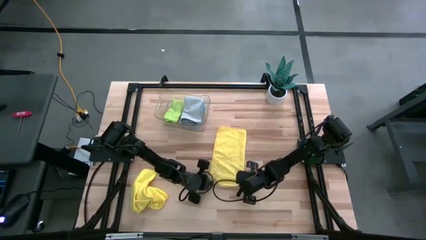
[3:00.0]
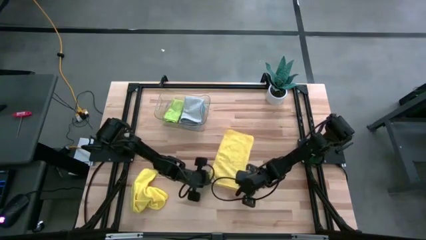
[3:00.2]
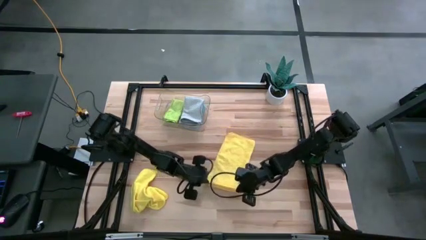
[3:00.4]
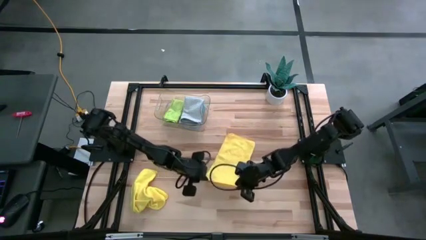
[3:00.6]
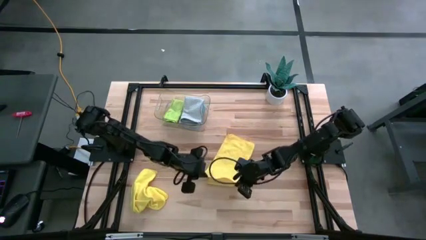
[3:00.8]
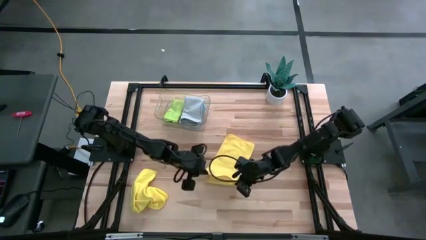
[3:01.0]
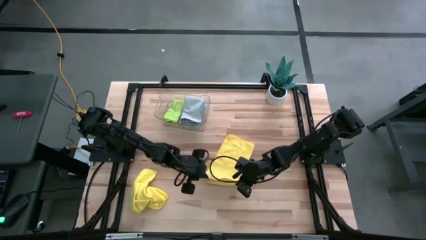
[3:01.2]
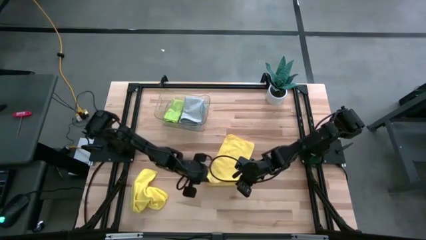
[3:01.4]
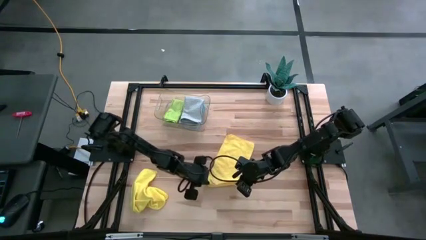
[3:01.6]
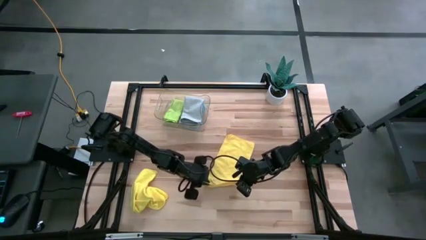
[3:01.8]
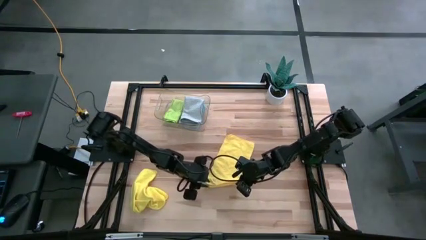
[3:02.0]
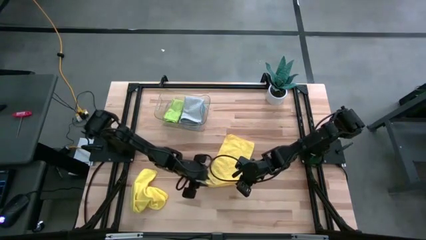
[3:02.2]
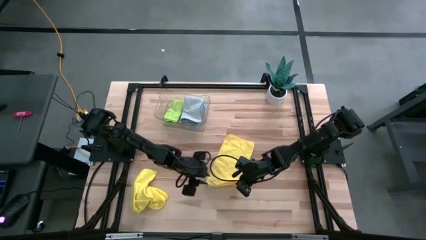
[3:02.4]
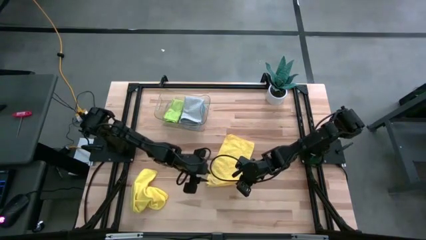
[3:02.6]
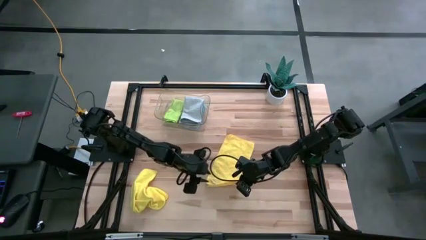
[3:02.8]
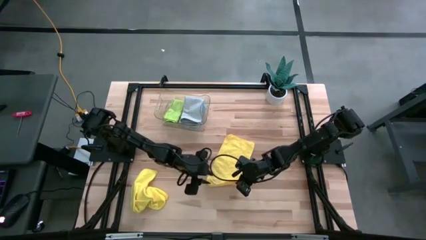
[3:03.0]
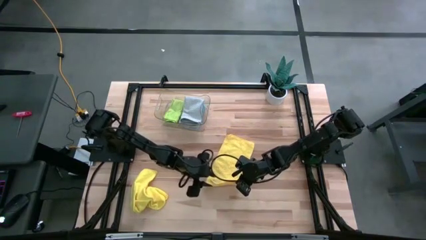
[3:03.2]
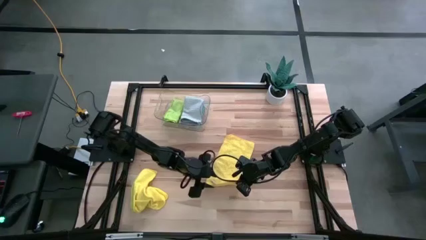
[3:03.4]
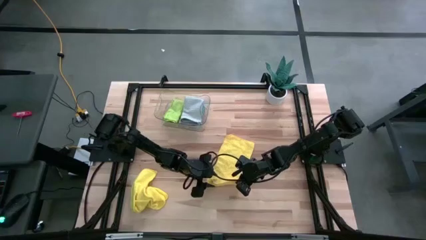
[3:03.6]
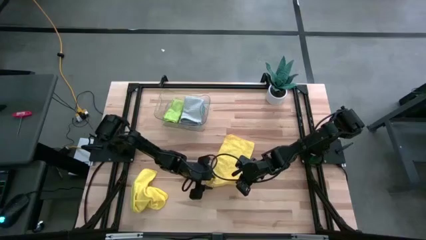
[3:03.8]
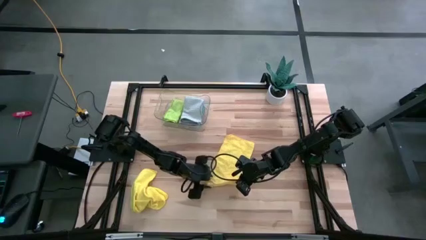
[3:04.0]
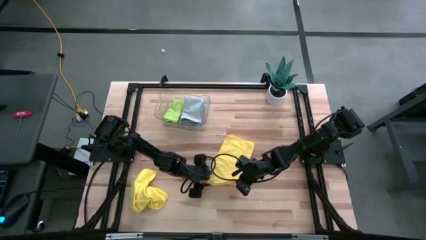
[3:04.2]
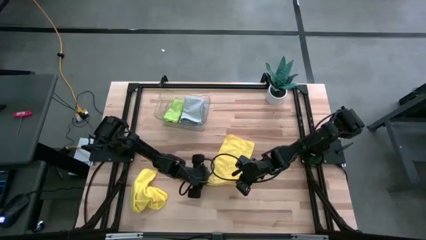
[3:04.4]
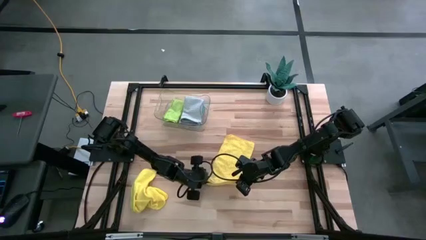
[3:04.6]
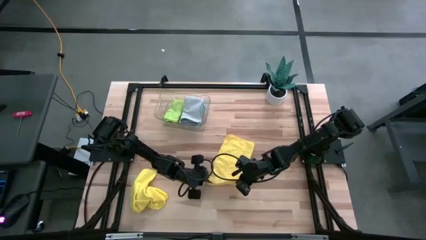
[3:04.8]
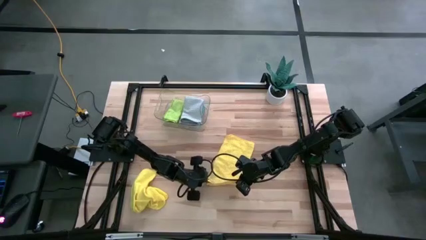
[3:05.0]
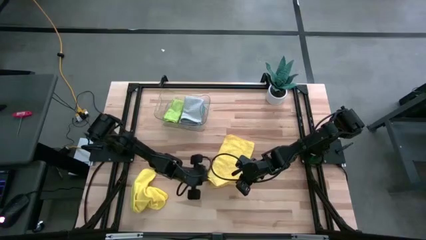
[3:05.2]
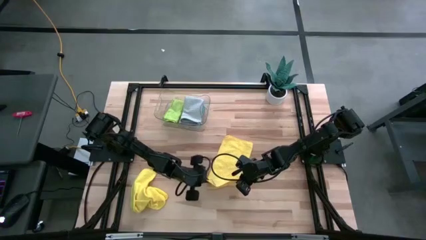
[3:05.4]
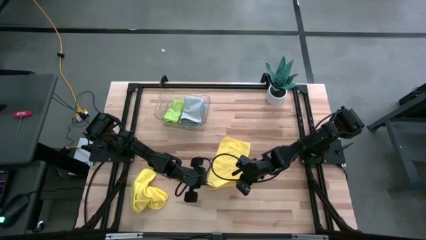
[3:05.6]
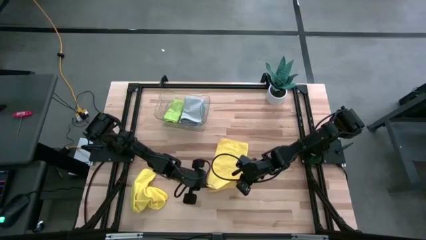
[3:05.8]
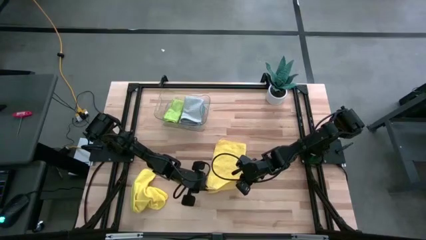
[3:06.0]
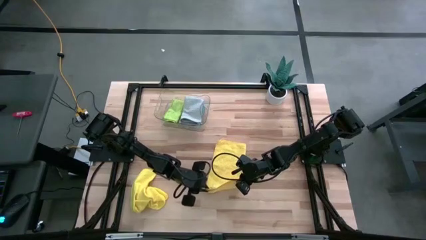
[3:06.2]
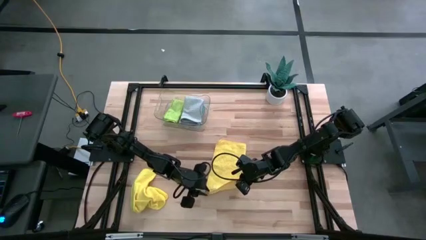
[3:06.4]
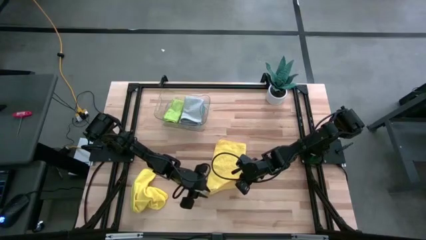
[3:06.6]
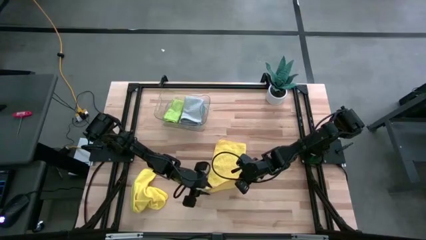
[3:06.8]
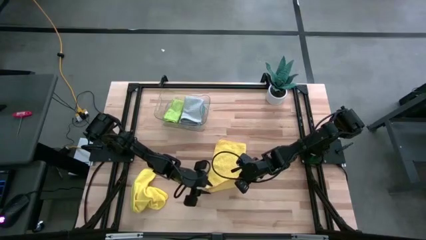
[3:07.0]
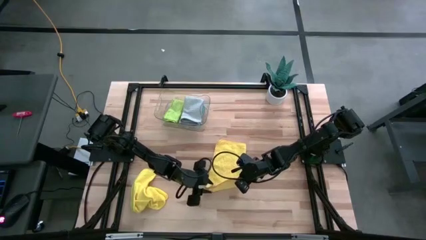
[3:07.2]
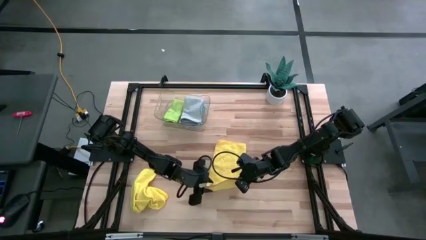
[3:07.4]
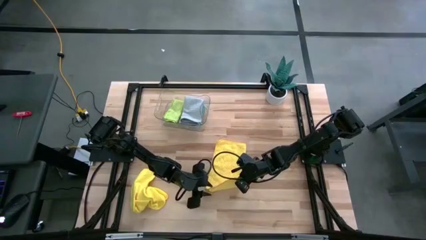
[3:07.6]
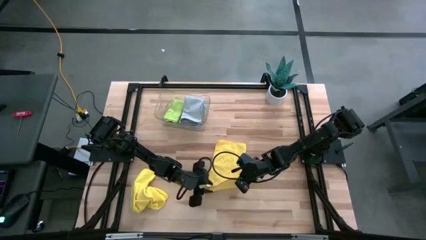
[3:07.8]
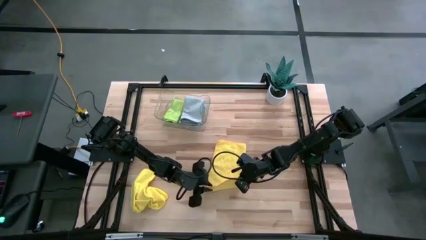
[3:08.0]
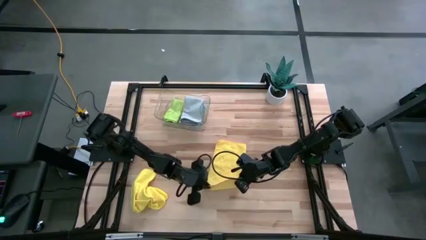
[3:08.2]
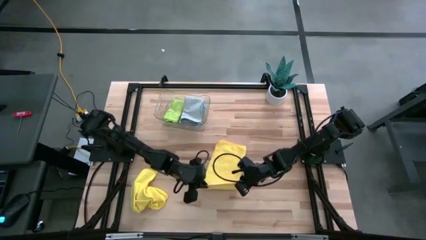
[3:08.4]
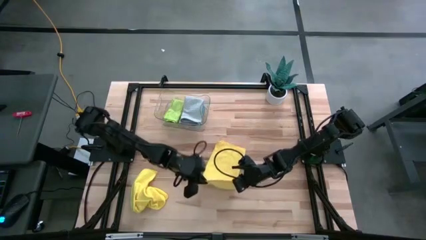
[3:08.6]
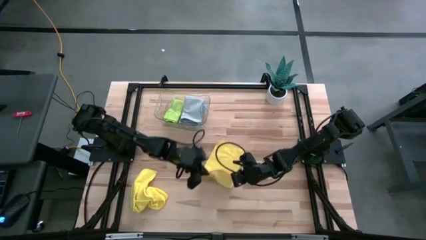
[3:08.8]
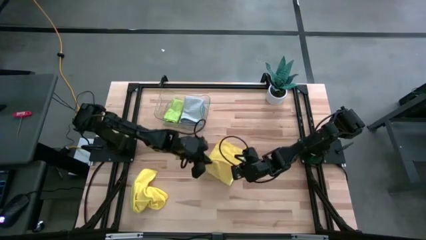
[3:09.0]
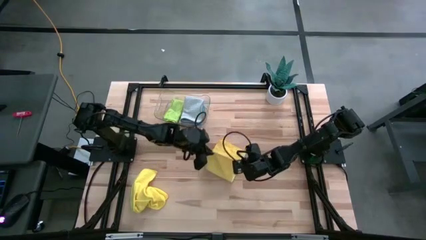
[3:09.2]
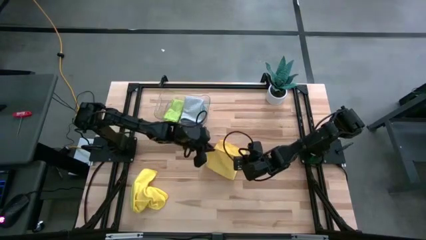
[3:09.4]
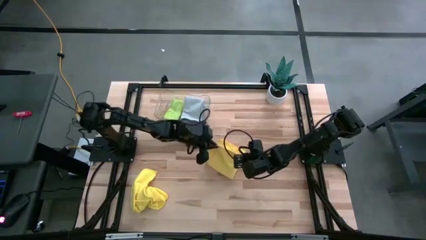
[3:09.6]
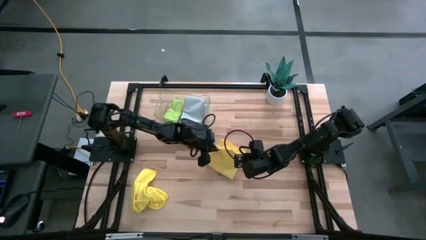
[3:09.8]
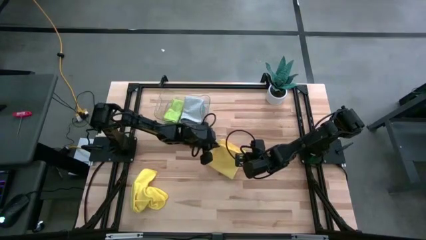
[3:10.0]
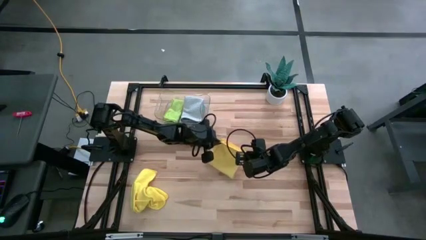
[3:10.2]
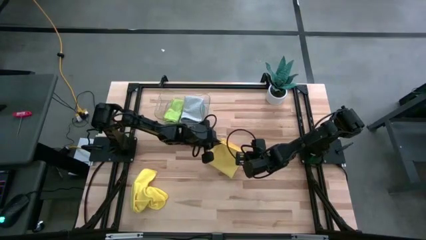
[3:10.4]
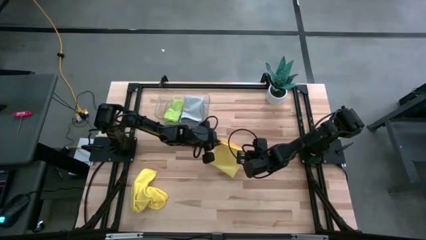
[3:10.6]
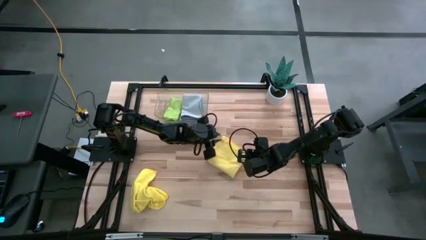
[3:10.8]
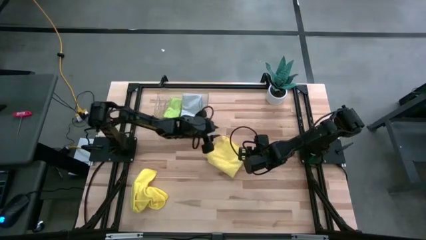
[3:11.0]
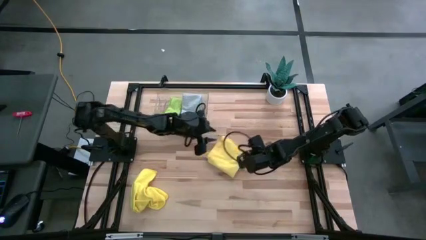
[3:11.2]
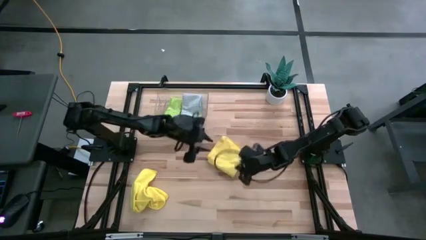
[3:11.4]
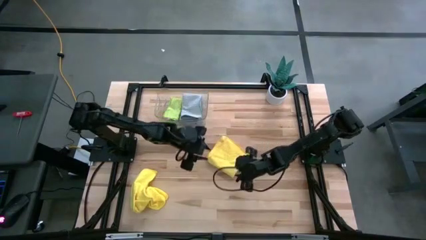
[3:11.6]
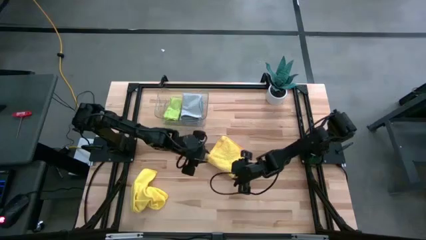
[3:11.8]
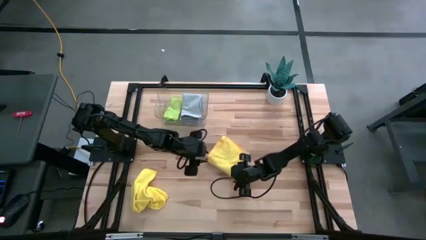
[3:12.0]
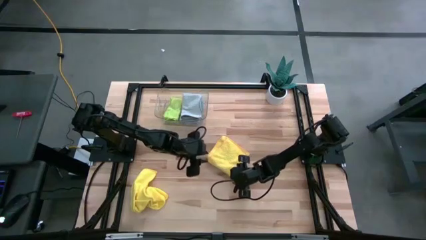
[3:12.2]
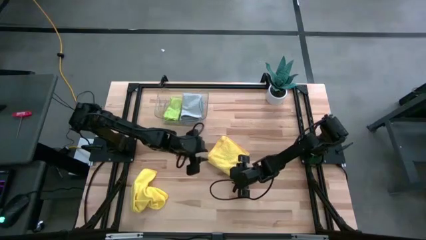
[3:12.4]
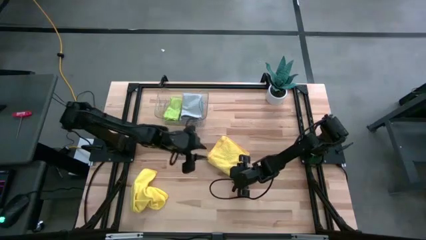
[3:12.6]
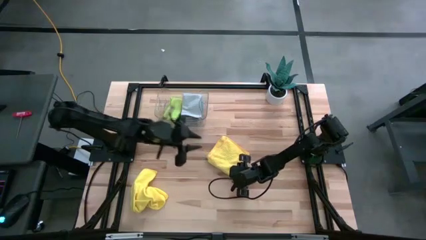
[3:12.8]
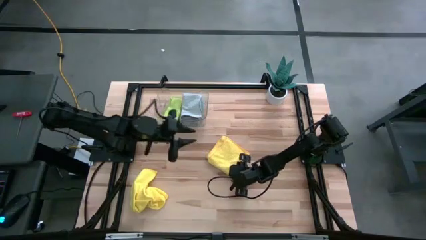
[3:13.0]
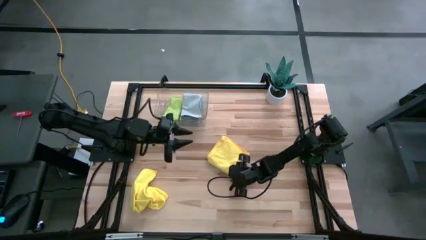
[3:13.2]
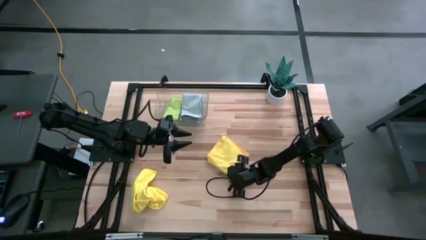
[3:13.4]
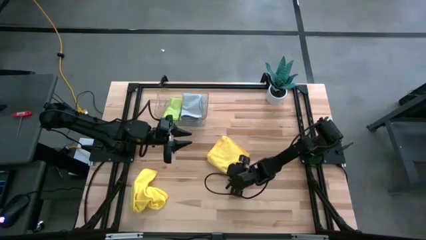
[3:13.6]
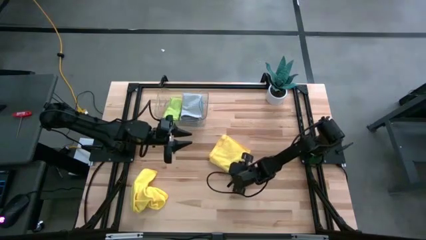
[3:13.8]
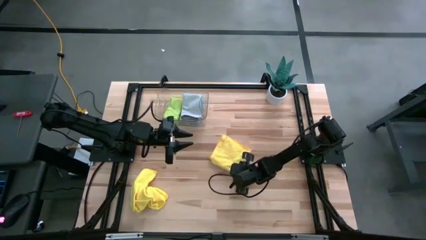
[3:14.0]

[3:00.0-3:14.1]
Task: Fold microfiber towels
Fold the top yellow towel
